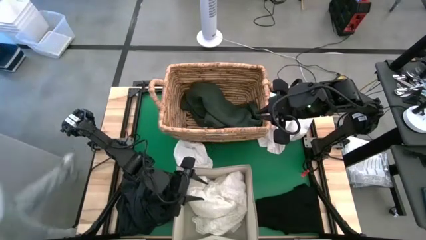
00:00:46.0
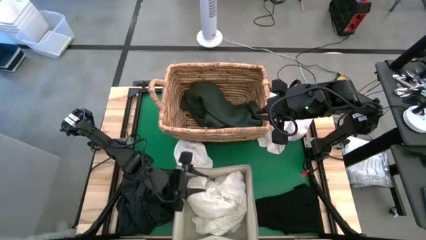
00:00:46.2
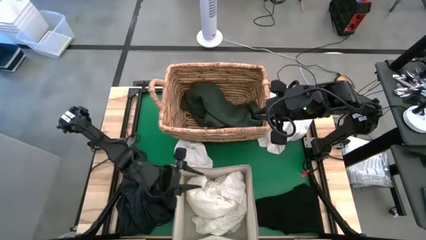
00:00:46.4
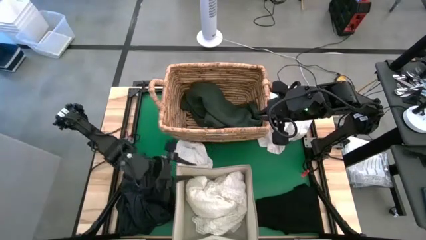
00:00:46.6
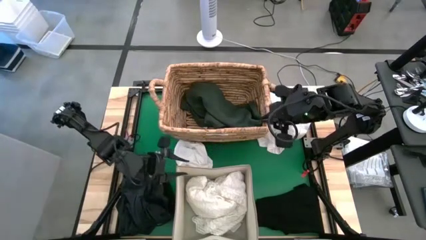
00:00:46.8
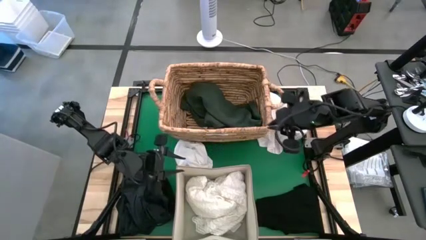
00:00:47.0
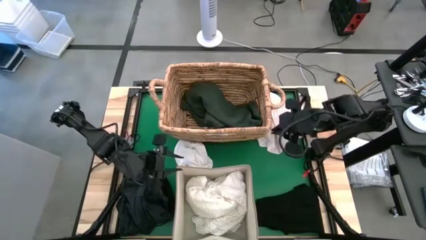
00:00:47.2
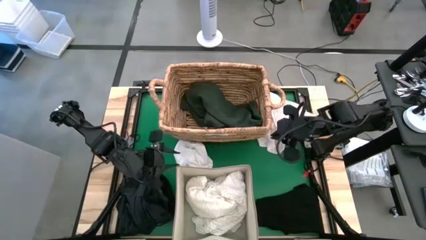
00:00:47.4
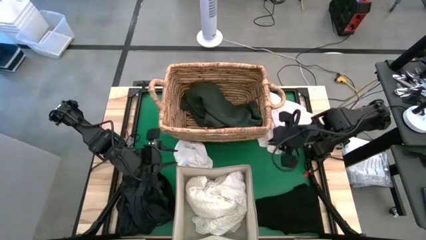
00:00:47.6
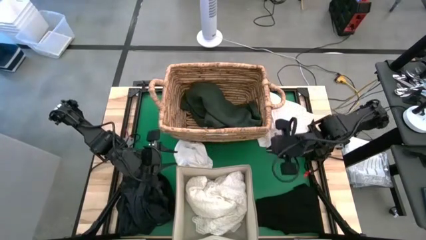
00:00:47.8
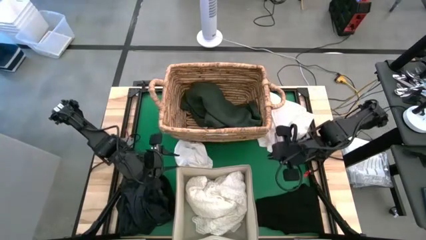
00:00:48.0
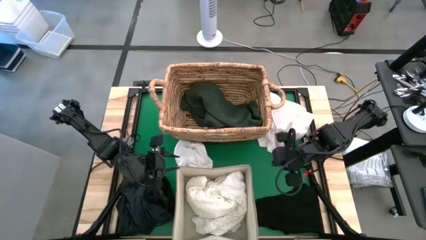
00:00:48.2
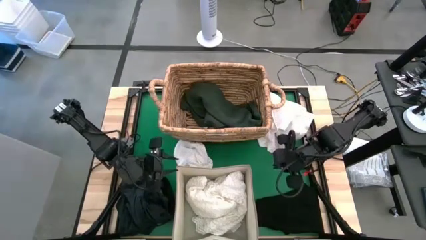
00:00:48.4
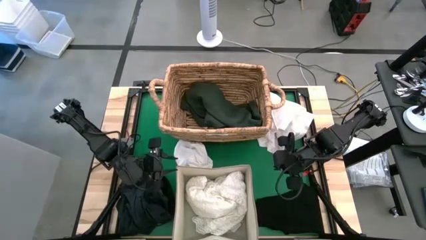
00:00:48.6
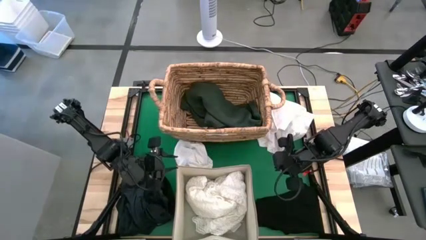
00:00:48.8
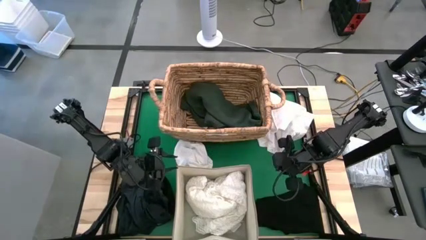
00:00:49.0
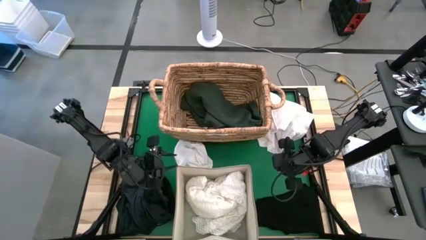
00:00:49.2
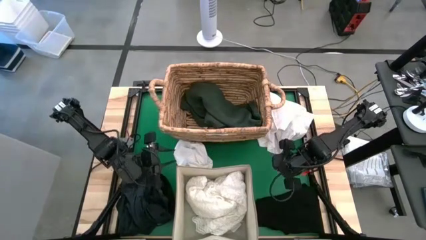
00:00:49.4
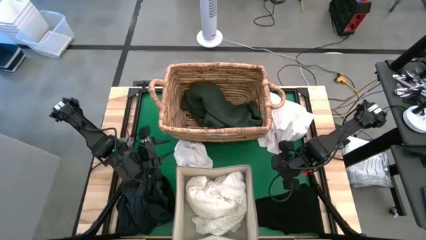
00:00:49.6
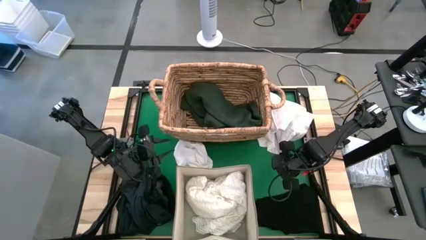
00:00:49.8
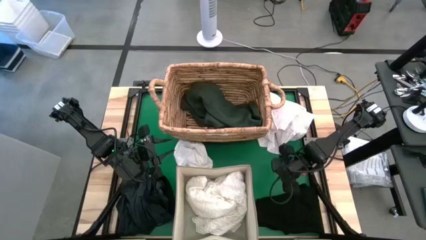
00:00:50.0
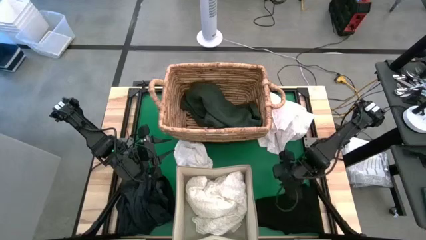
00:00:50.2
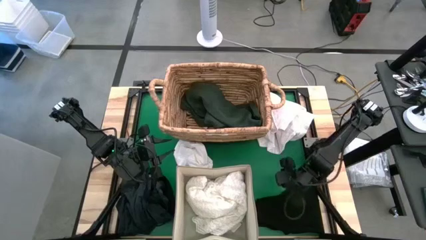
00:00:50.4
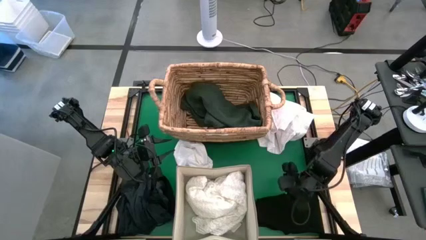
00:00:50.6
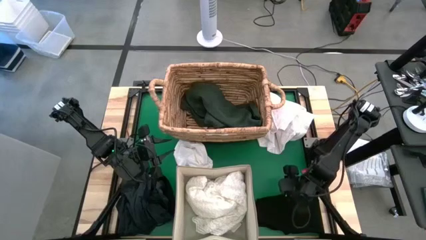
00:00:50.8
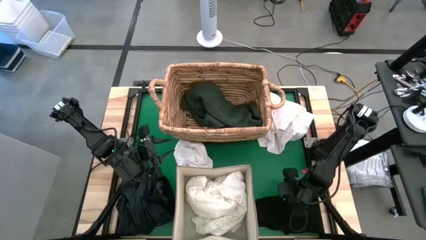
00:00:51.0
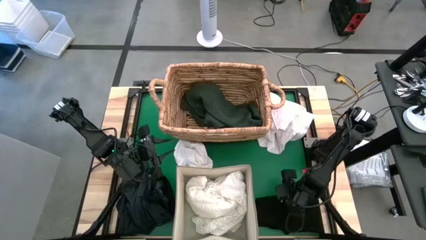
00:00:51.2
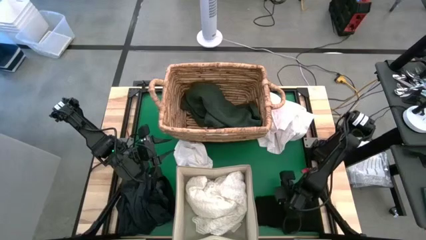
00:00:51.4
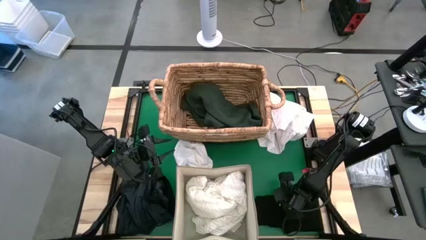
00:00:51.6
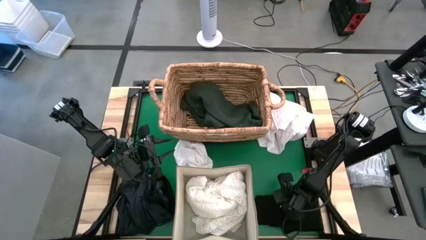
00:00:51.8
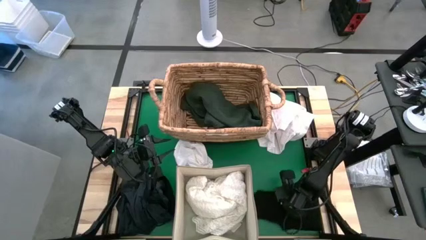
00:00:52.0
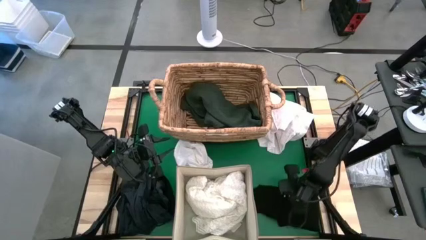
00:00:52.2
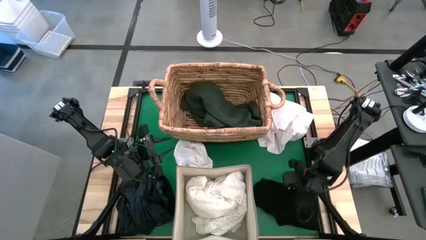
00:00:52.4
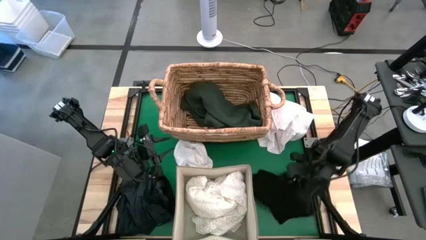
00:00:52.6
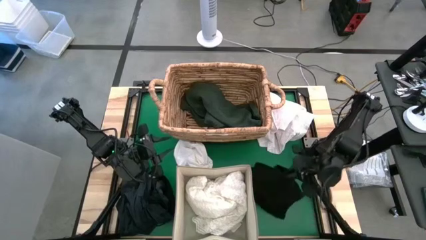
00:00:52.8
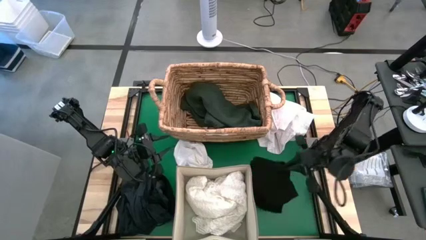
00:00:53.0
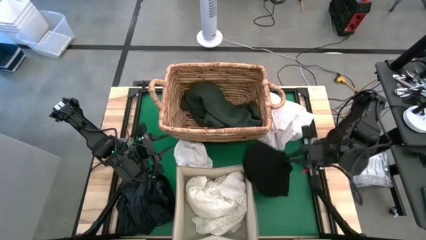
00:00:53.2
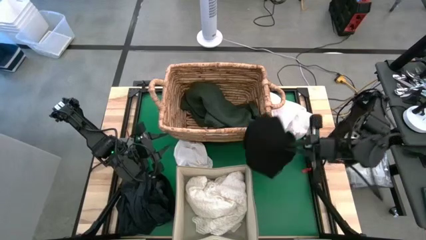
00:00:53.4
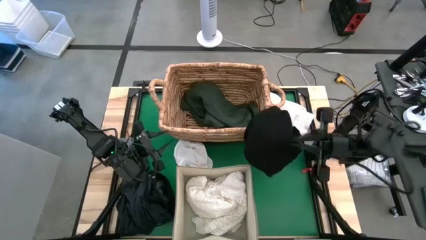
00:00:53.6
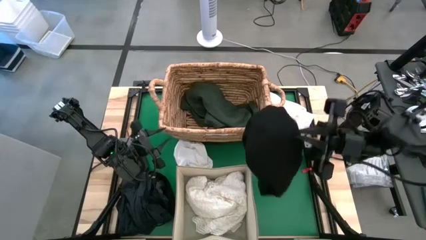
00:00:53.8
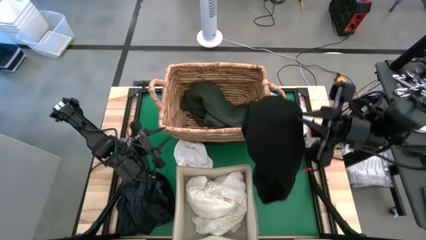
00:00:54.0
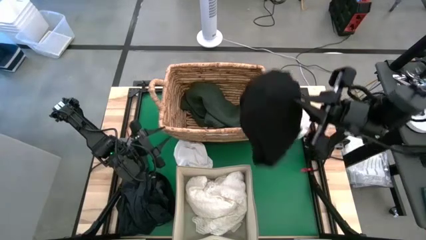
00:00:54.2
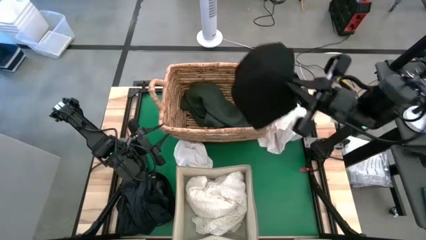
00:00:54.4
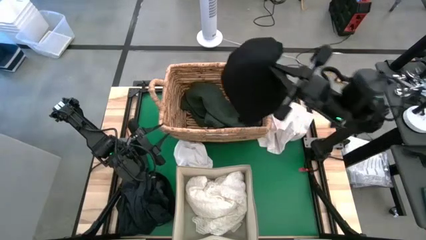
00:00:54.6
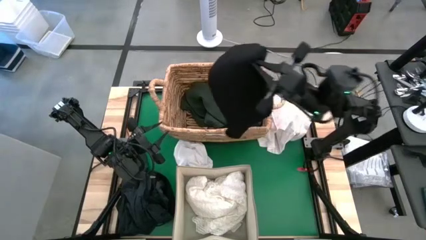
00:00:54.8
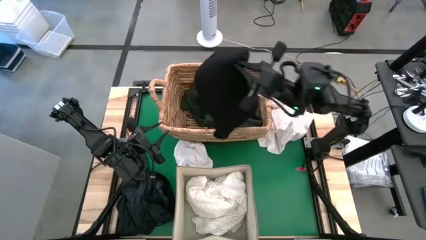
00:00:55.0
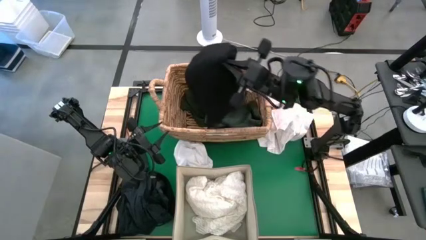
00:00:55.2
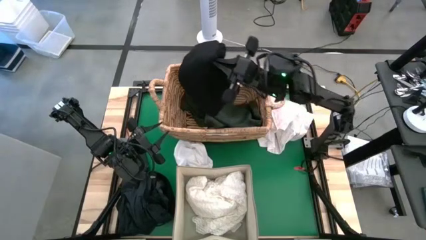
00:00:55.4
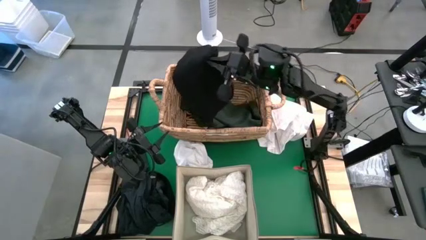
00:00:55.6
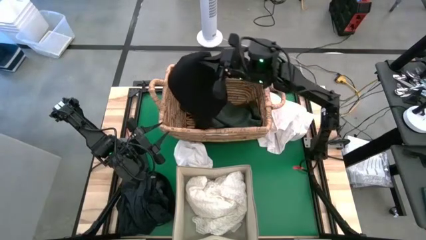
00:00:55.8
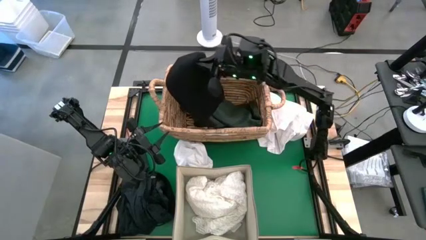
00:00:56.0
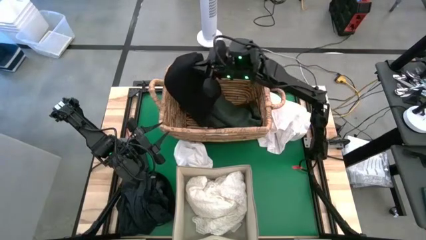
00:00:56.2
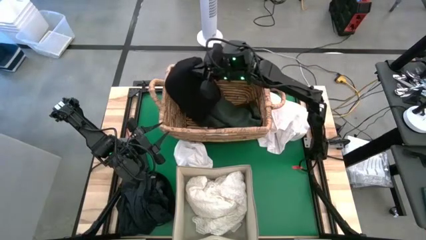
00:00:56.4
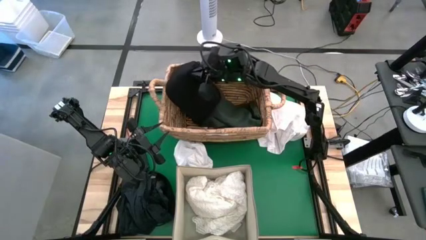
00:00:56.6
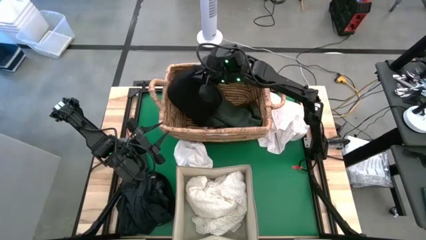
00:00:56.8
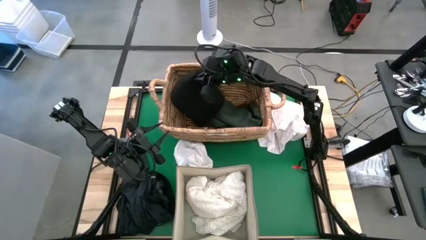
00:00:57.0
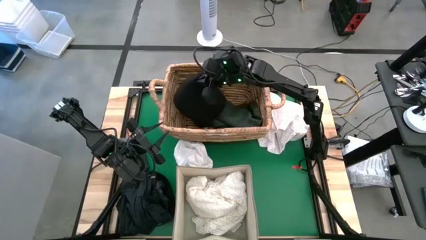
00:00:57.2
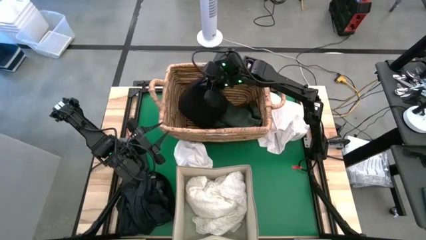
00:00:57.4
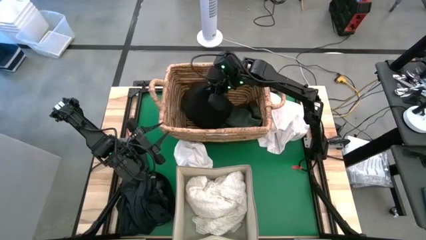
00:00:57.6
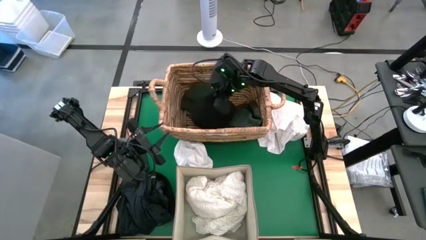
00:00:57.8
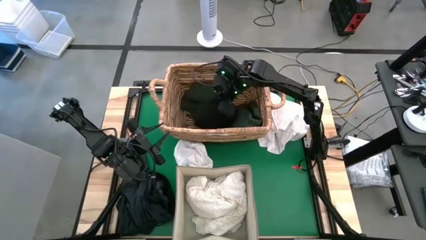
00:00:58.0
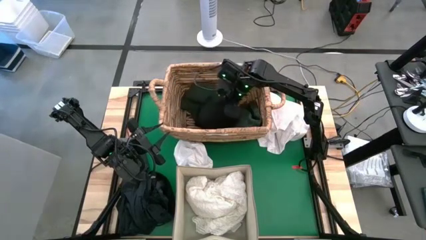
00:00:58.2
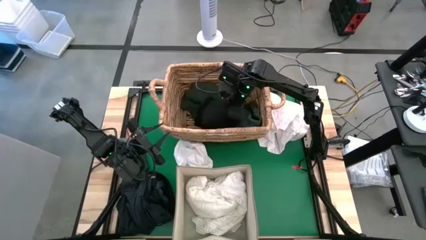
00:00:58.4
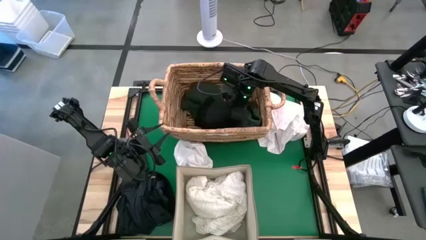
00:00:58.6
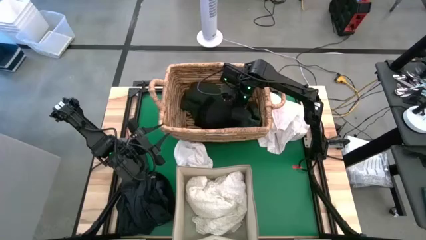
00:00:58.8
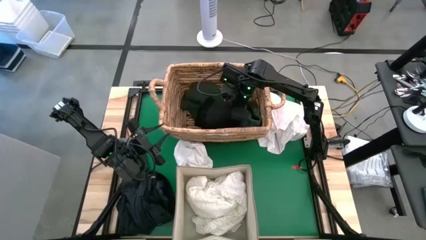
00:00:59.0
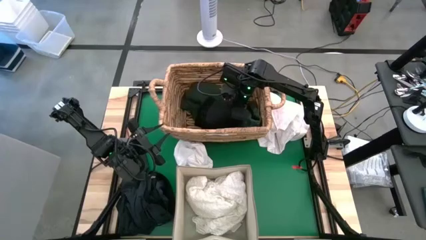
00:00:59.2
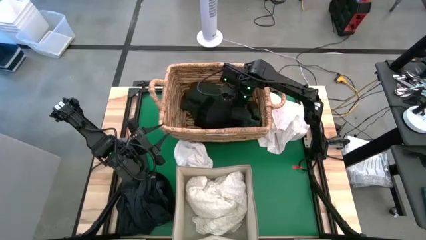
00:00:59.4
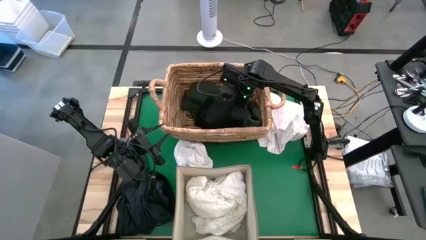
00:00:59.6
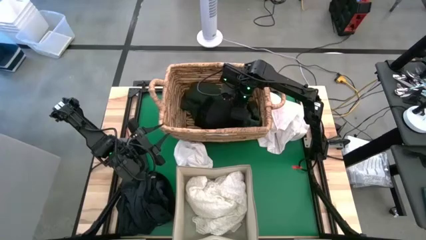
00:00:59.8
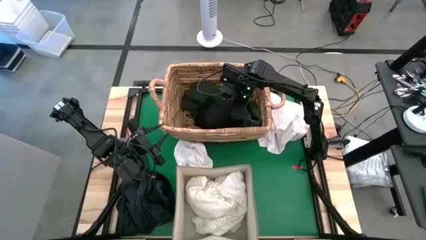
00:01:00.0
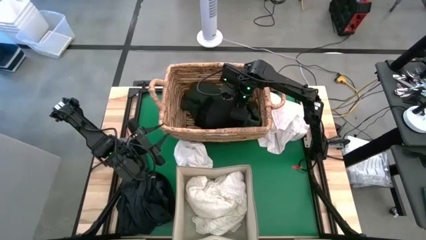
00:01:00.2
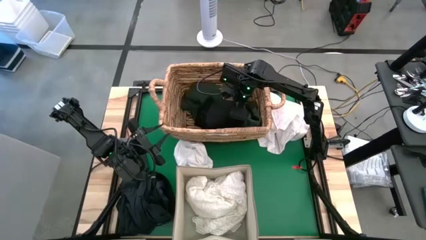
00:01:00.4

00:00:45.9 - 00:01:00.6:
Put the black pants into the brown basket

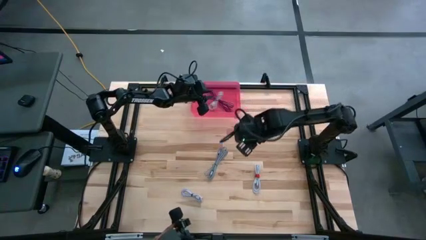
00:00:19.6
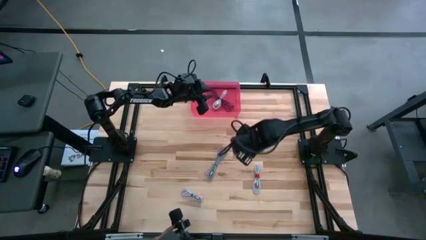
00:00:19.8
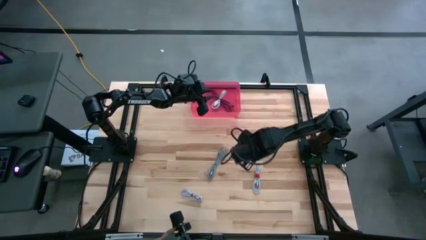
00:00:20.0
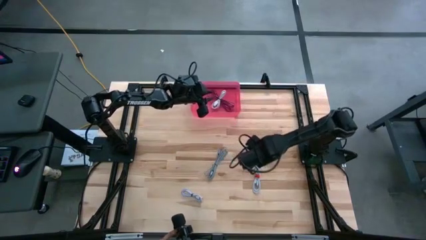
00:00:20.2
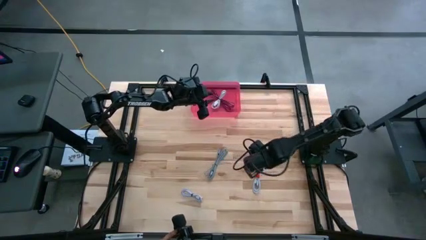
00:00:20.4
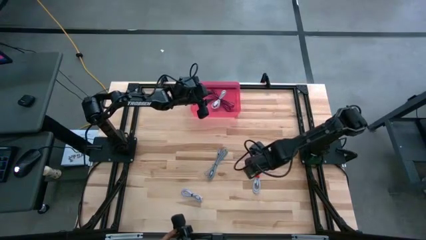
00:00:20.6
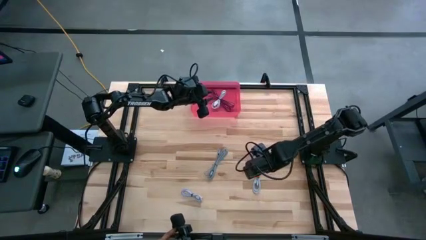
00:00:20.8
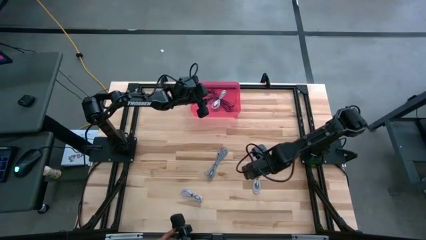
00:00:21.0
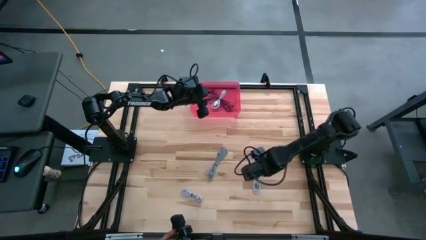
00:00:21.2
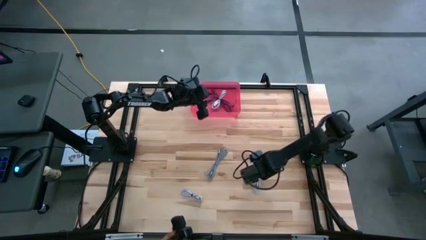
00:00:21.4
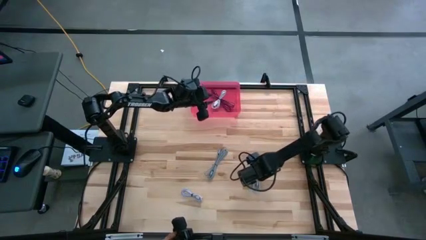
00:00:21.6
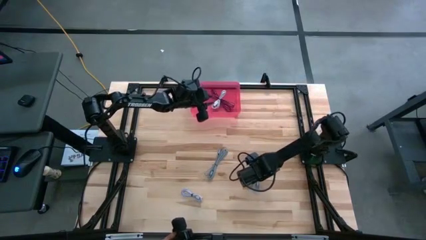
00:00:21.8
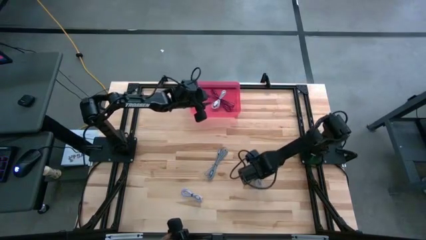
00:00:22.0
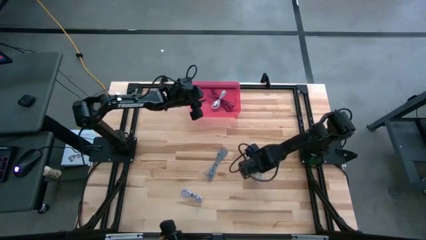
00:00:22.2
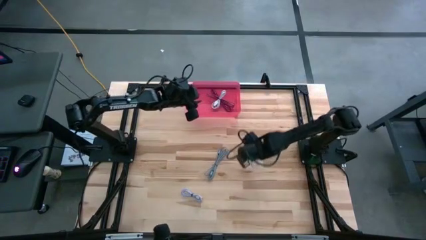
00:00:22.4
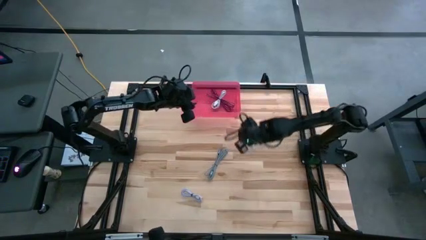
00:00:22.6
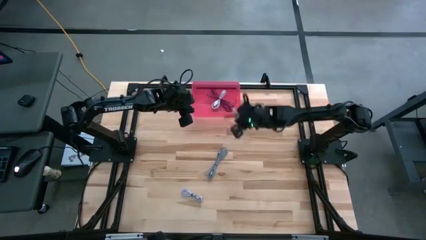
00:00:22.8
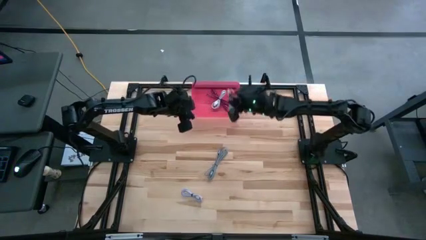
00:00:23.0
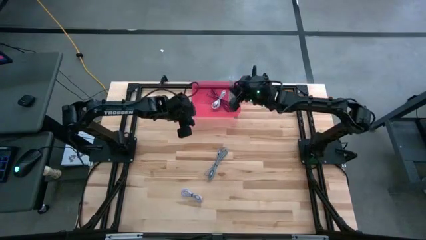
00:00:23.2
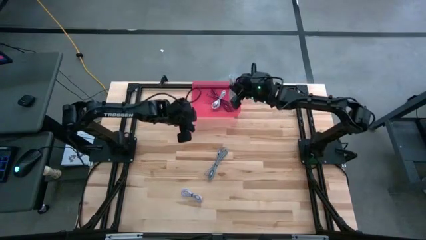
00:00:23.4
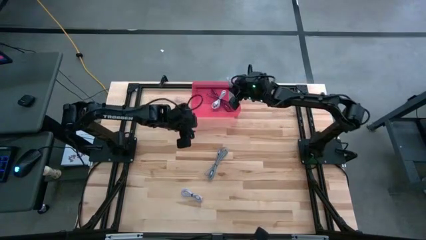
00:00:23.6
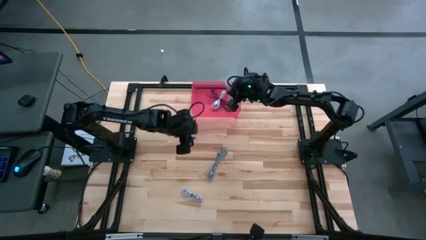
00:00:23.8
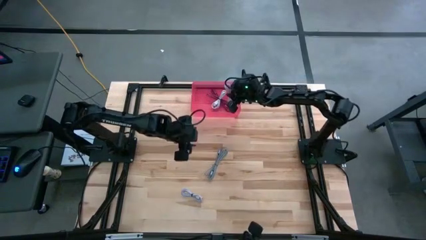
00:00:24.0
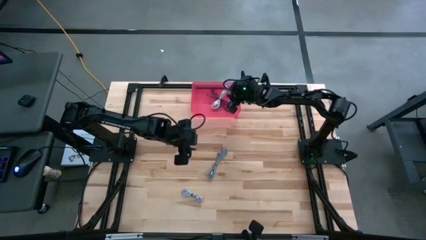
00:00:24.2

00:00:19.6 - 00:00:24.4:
Put the right white charger cable into the pink bin
